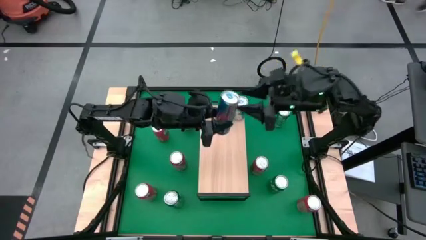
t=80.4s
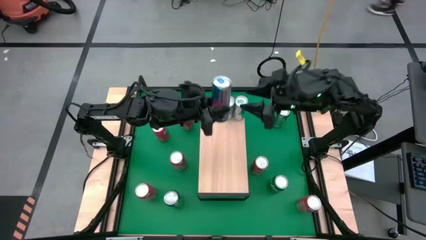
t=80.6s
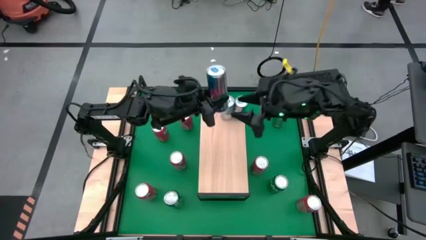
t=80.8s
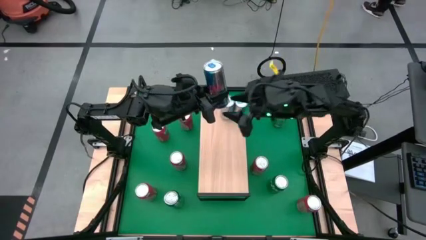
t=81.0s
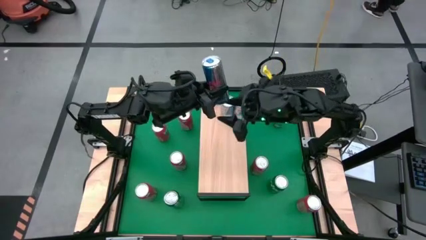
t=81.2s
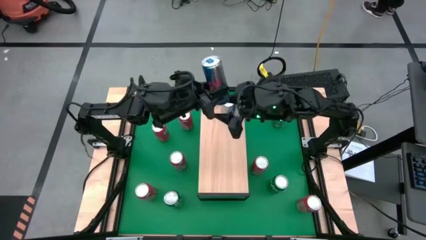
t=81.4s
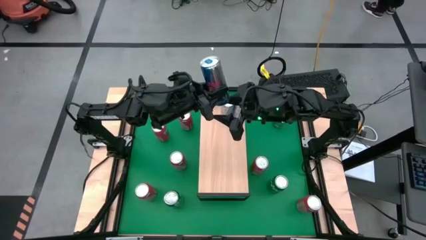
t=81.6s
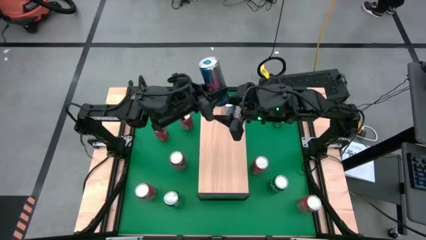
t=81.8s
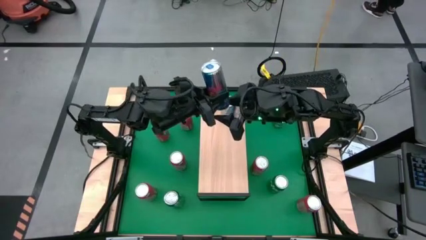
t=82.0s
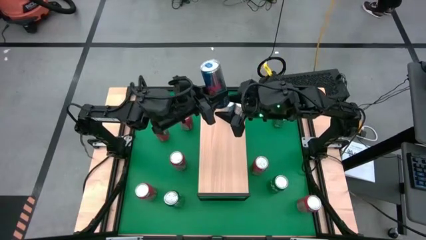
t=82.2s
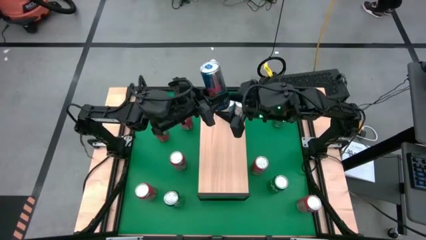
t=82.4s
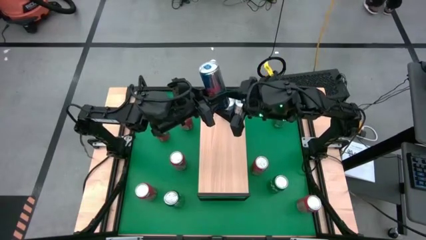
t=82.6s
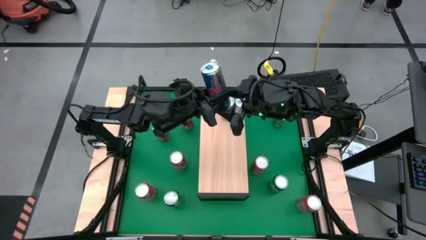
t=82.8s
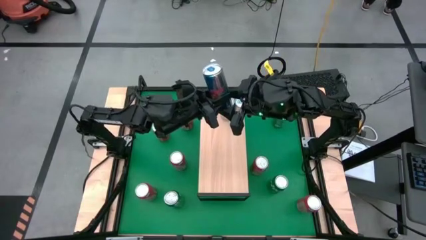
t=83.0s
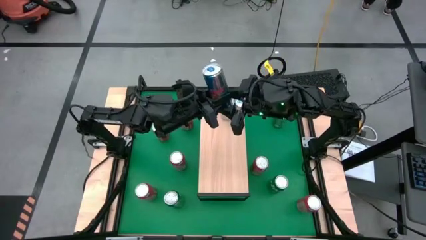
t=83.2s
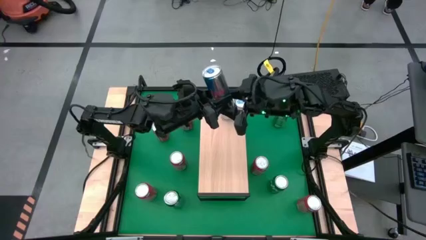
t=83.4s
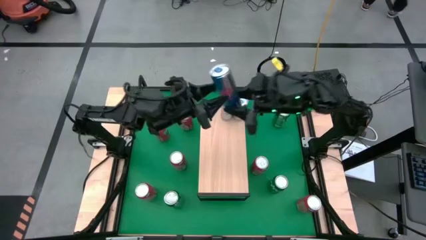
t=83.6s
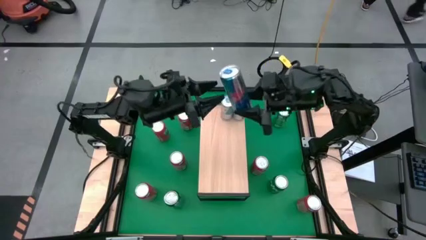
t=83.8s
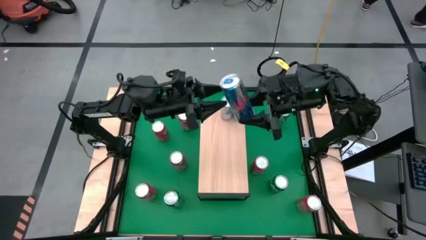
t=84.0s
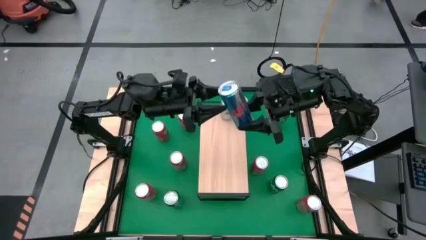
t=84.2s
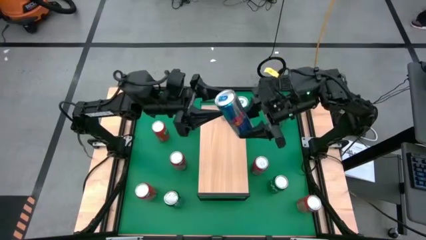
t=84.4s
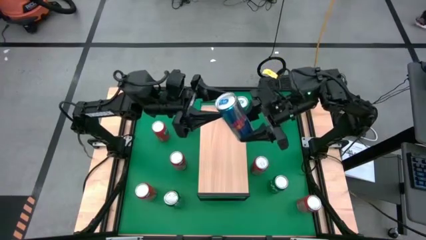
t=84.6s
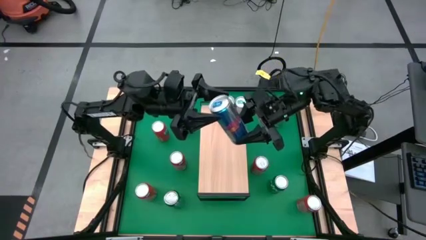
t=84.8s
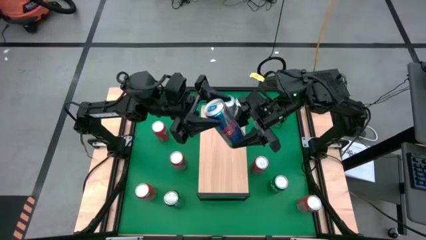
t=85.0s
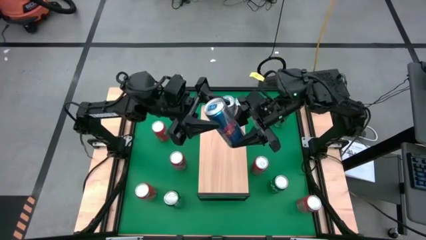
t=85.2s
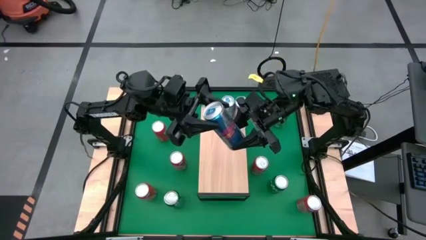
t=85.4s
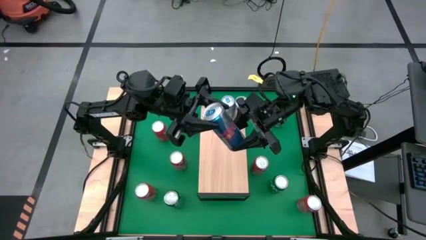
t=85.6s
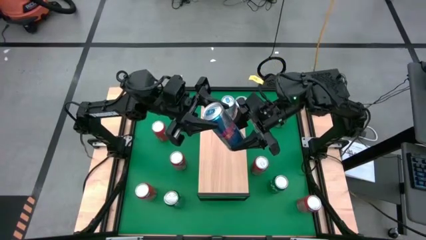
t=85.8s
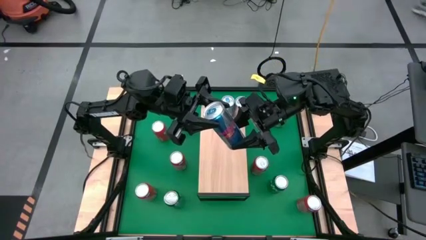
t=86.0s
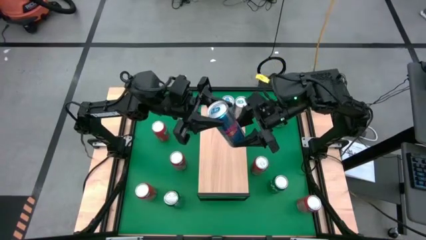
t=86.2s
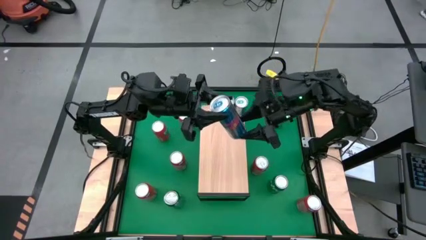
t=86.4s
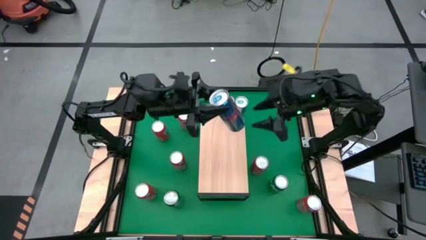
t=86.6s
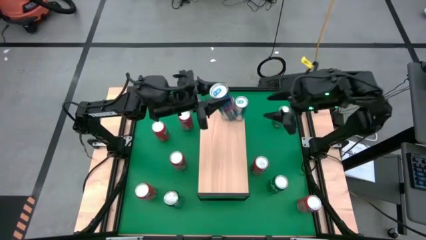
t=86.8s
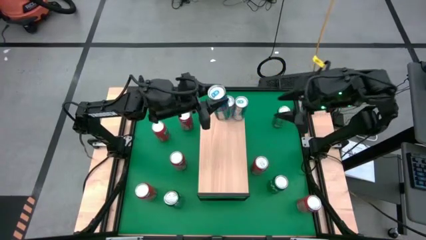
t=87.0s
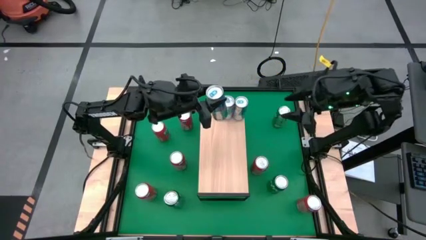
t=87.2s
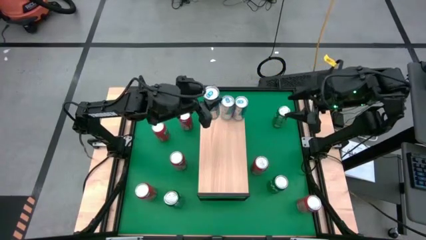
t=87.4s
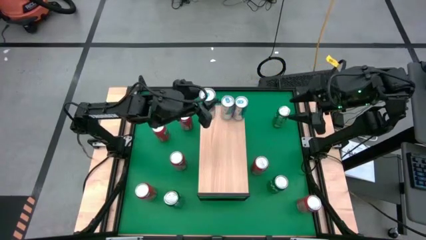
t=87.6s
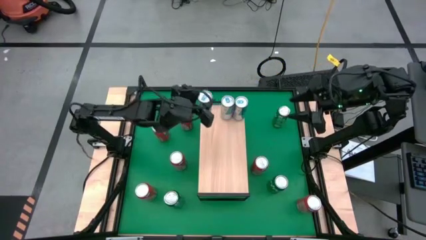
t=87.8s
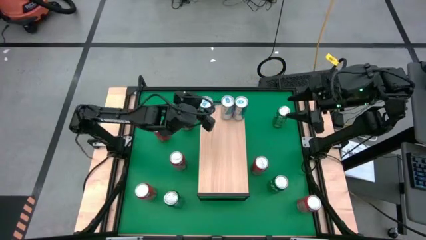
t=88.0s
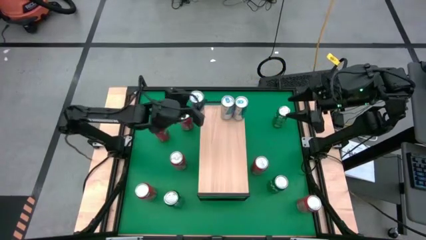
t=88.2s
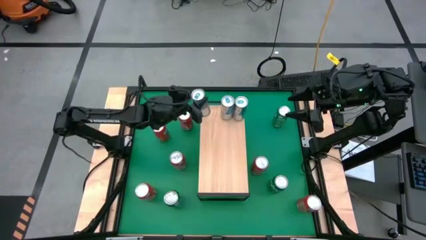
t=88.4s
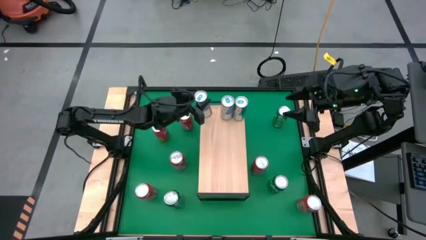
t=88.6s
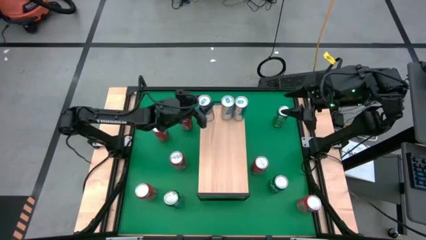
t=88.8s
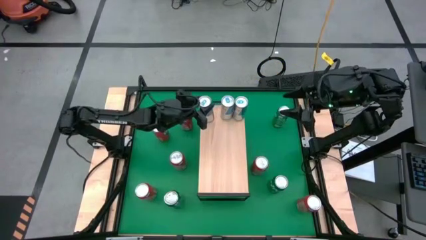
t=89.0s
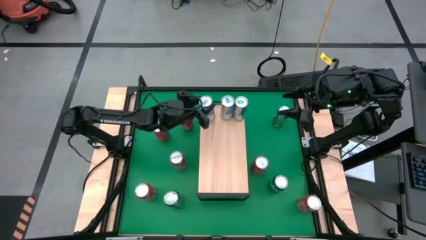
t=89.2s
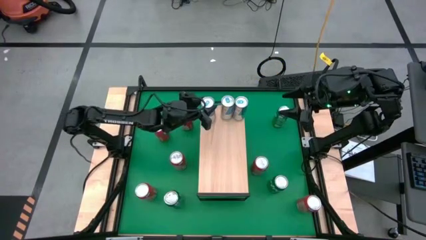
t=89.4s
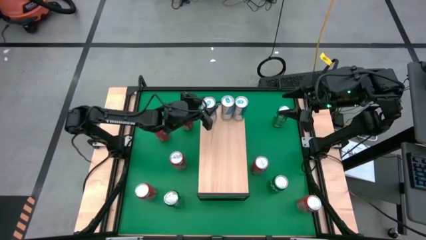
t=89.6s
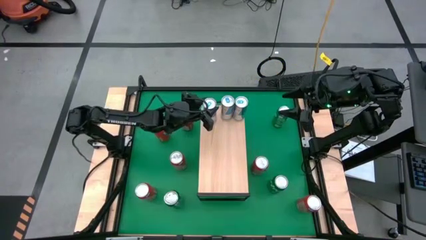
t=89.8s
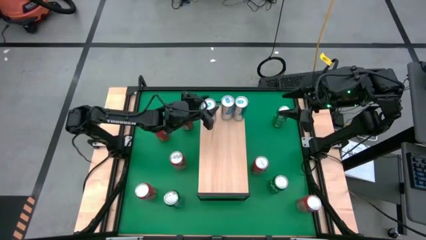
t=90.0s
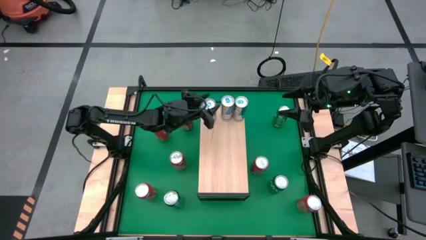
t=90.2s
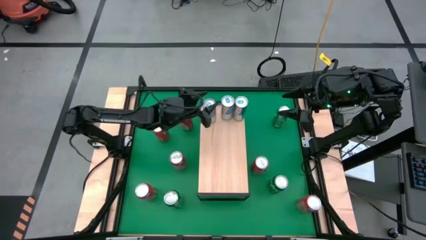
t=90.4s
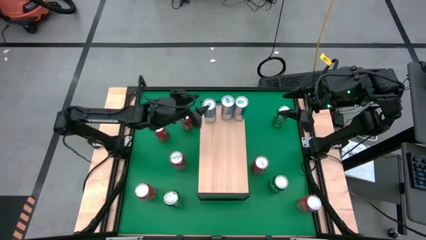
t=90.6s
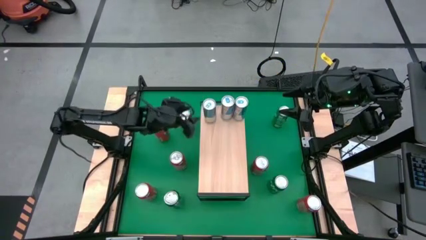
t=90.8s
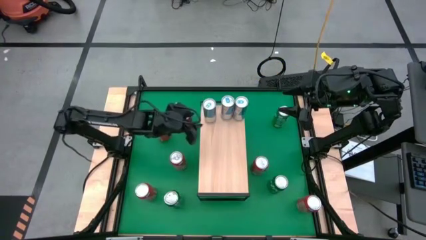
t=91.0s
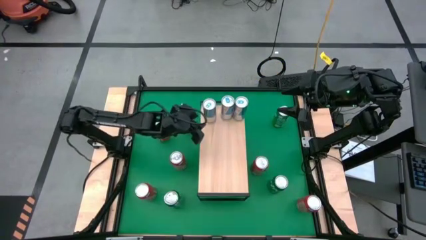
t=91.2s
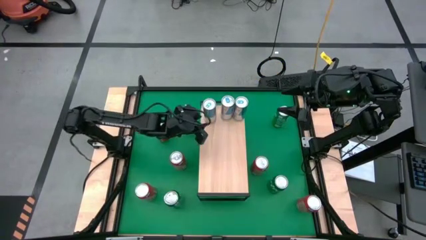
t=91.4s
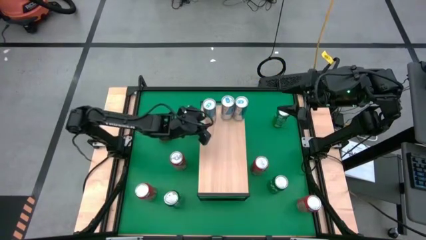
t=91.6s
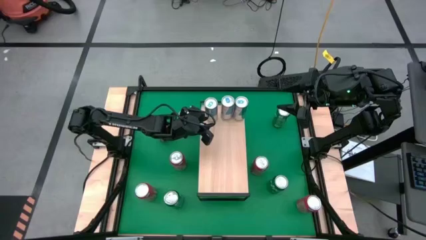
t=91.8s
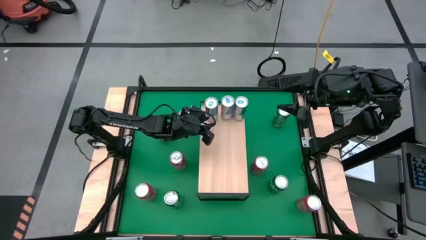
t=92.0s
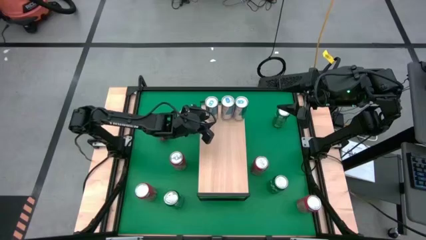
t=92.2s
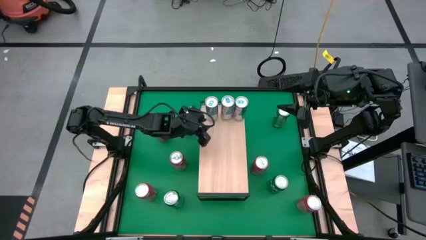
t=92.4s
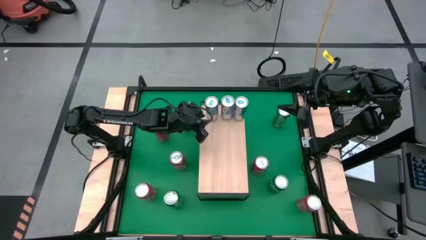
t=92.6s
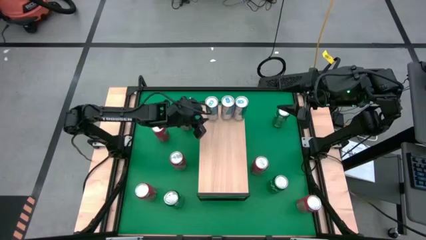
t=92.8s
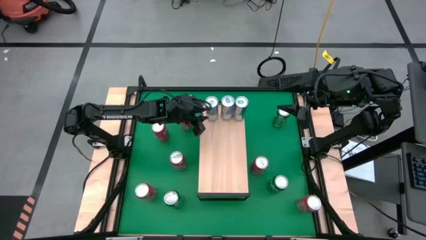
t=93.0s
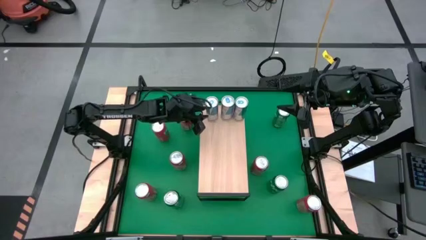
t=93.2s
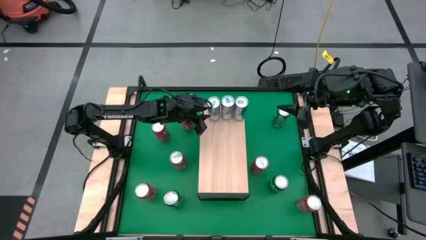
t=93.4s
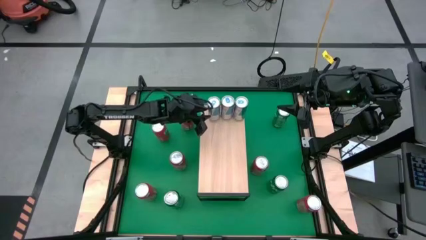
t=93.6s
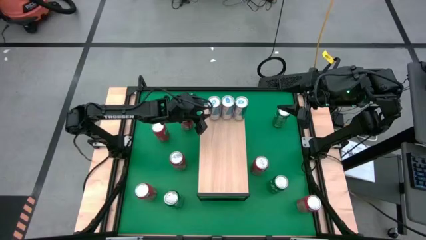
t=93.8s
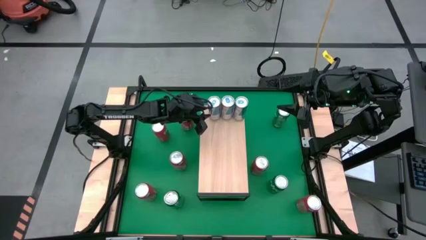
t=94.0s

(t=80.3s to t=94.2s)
Task: Place canned beverage on shelf
Put the blue soda can on the shelf aligned with the other blue soda can

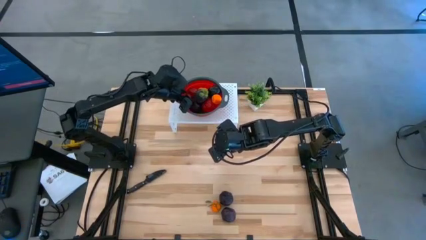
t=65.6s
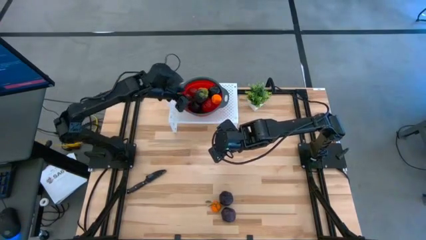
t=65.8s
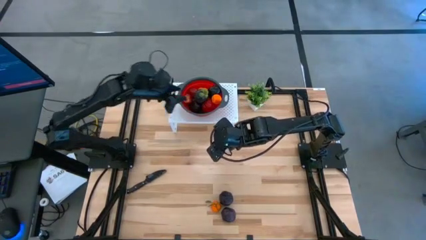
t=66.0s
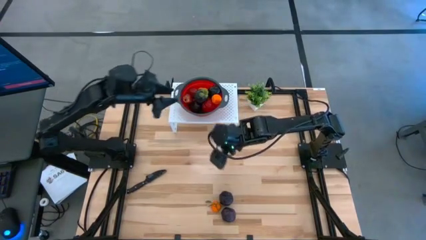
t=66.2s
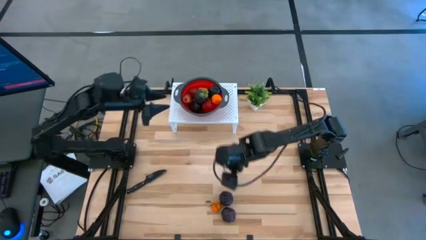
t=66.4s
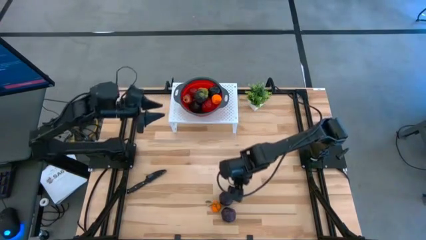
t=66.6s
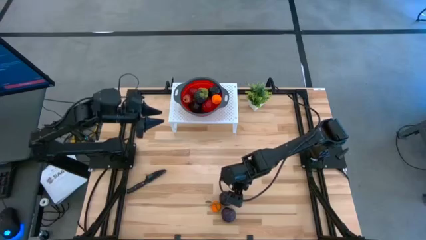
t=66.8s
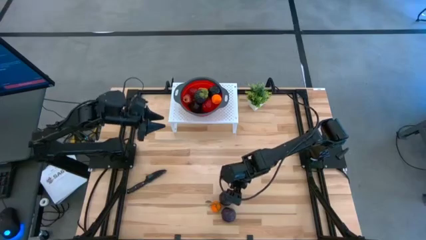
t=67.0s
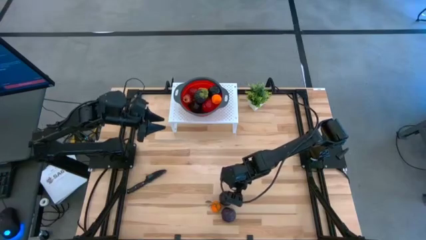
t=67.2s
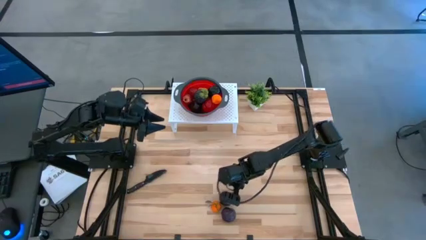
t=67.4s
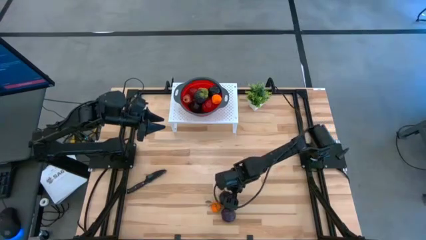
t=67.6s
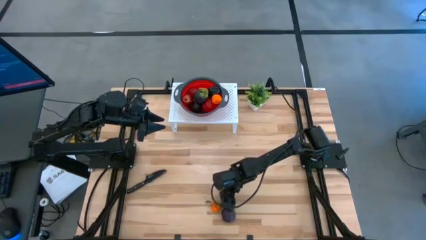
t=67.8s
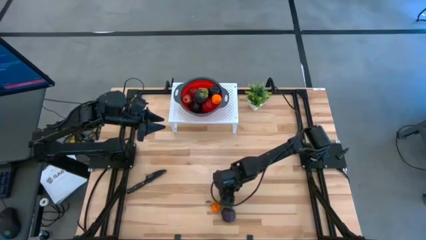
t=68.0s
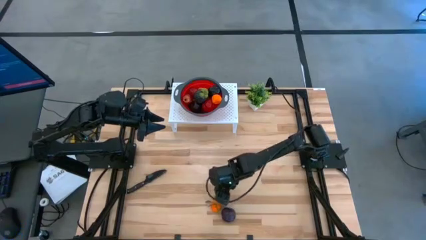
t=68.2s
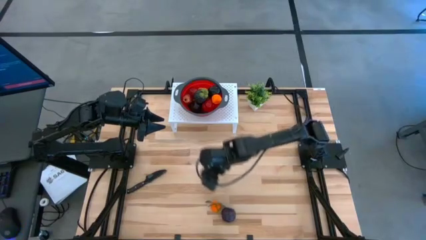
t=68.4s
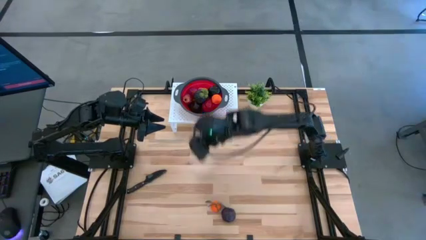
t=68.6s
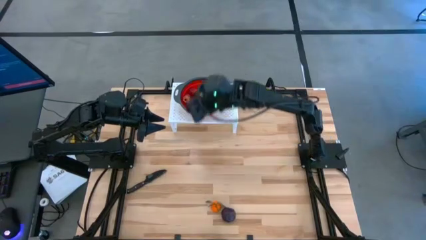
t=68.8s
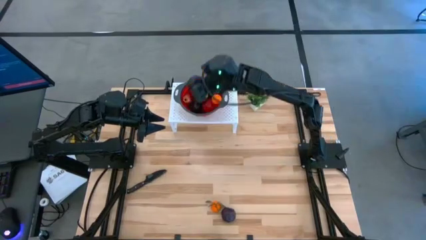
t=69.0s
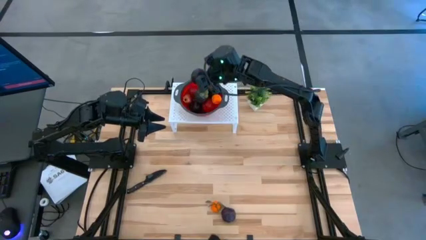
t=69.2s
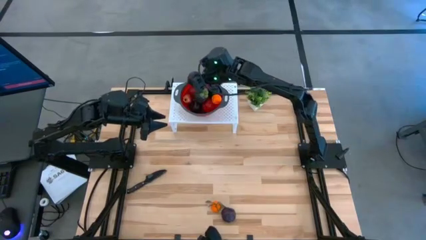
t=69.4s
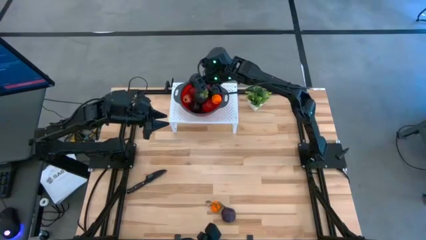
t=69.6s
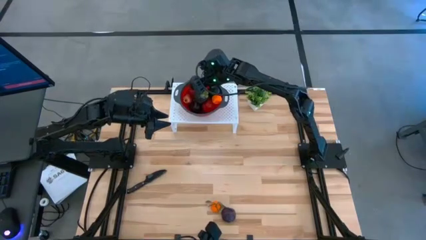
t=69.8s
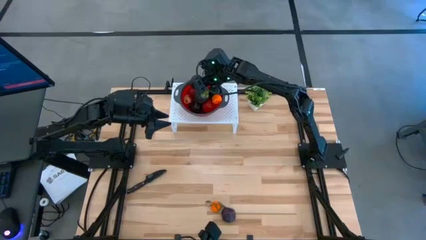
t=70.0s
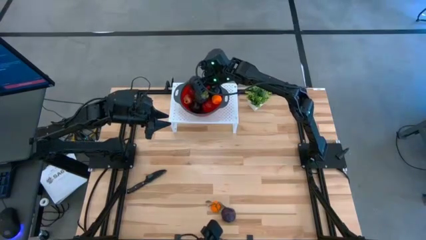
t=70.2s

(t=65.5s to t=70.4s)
Task: Pick & Place Fruit
Put the purple plum into the red strainer bowl on the shelf
